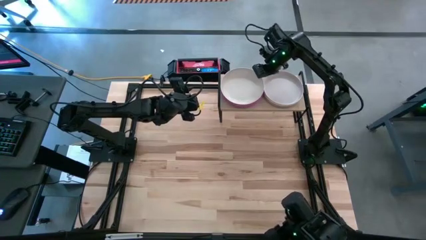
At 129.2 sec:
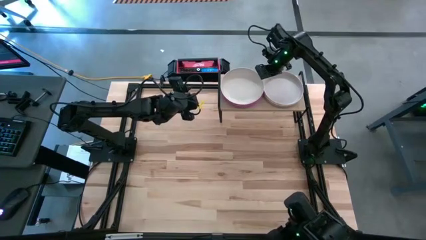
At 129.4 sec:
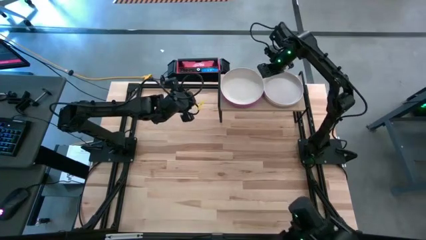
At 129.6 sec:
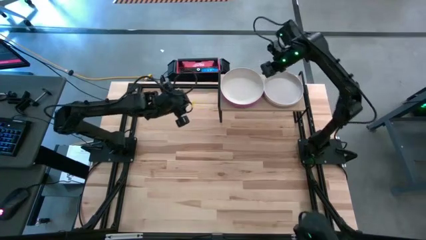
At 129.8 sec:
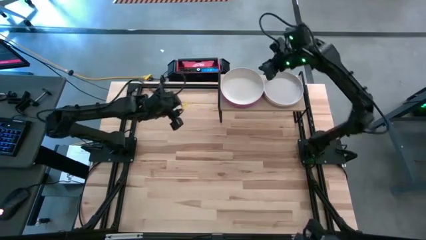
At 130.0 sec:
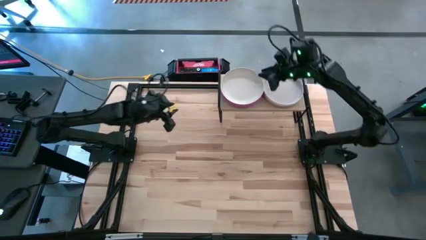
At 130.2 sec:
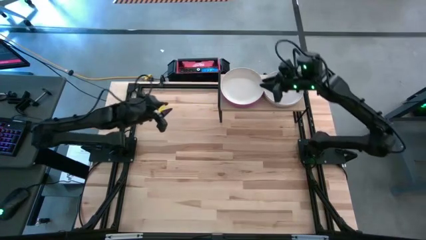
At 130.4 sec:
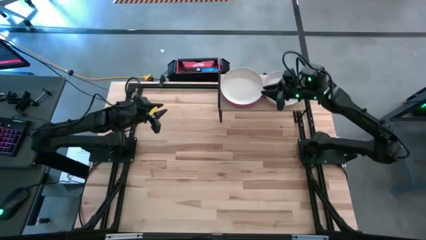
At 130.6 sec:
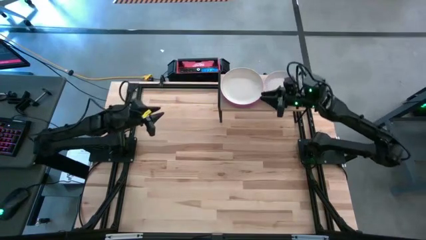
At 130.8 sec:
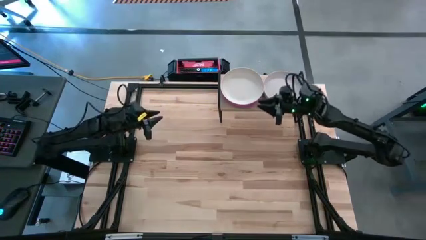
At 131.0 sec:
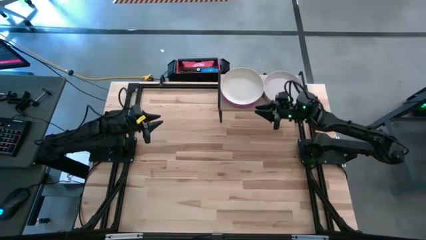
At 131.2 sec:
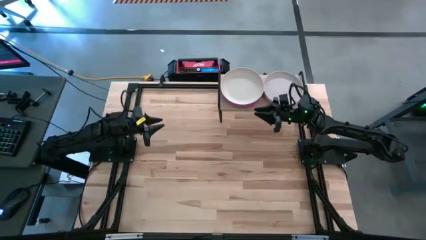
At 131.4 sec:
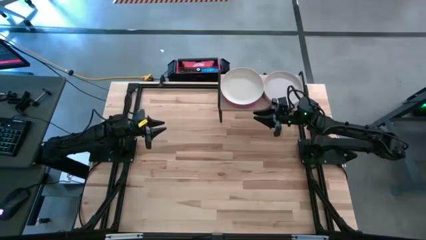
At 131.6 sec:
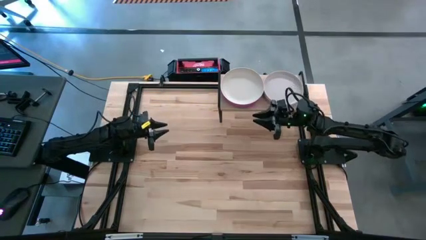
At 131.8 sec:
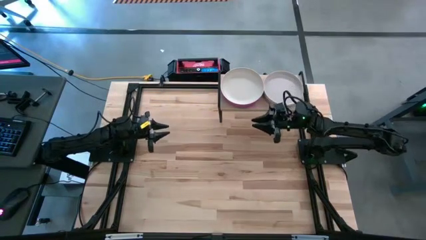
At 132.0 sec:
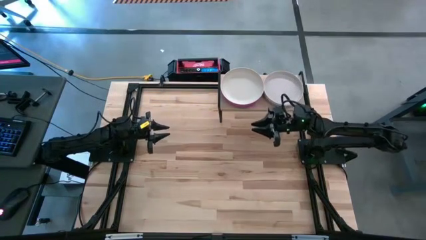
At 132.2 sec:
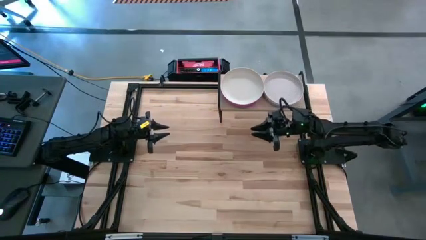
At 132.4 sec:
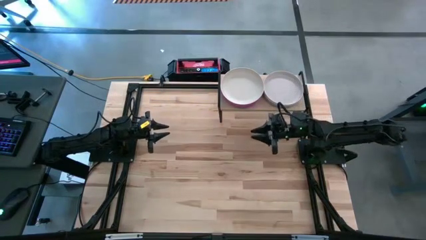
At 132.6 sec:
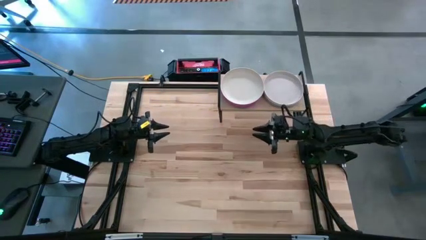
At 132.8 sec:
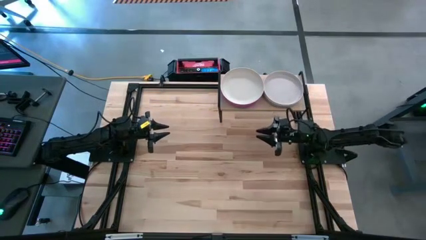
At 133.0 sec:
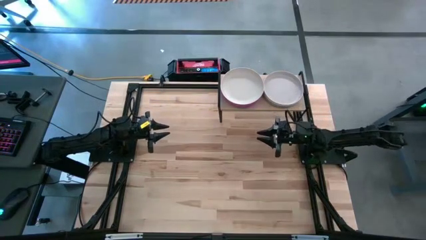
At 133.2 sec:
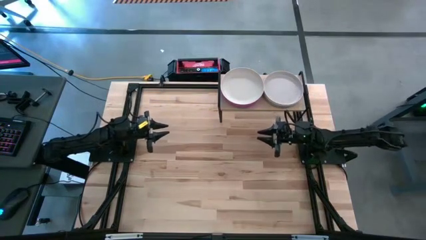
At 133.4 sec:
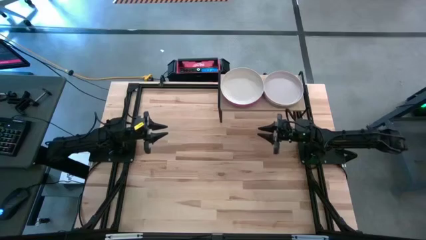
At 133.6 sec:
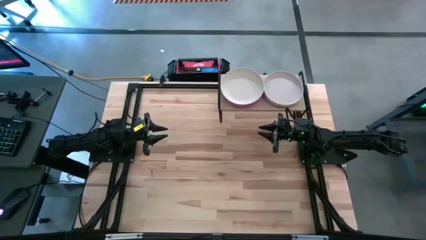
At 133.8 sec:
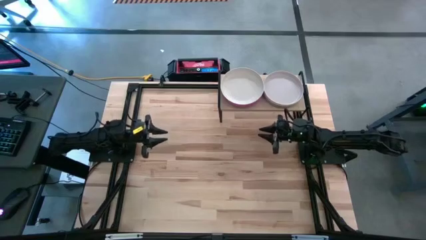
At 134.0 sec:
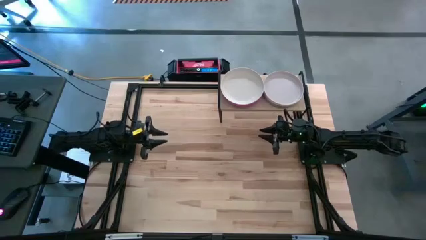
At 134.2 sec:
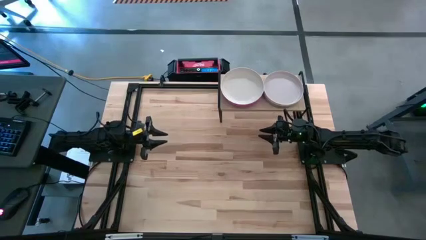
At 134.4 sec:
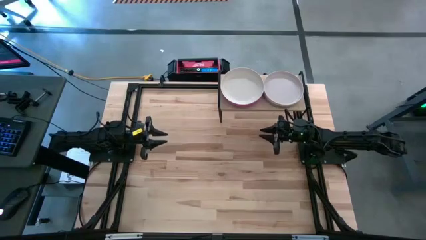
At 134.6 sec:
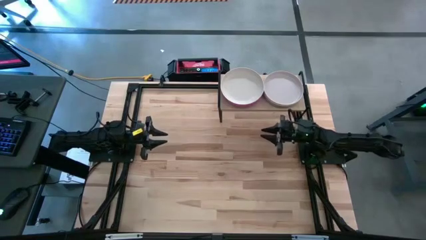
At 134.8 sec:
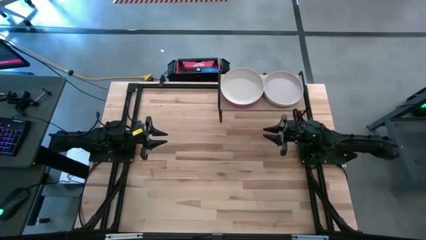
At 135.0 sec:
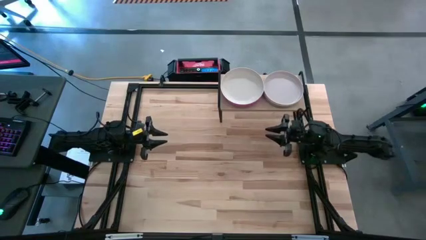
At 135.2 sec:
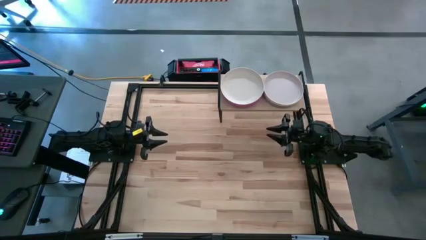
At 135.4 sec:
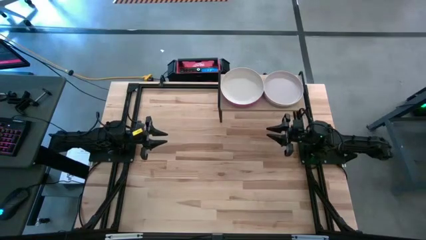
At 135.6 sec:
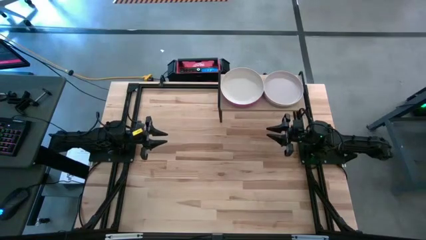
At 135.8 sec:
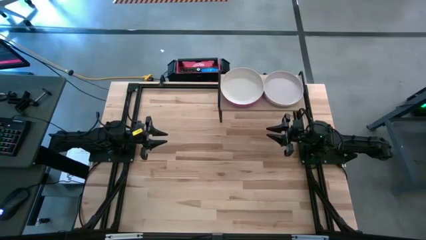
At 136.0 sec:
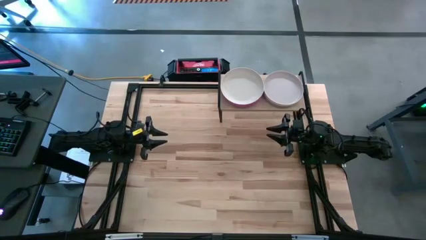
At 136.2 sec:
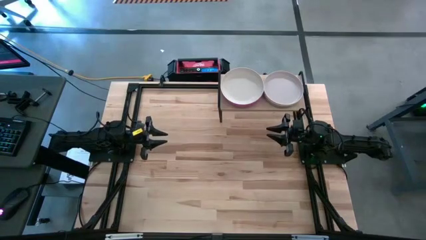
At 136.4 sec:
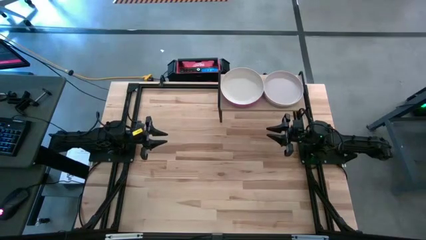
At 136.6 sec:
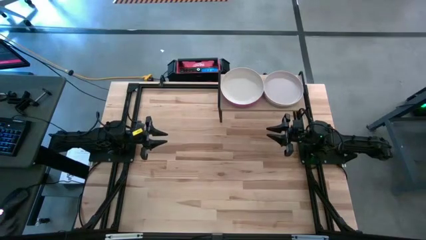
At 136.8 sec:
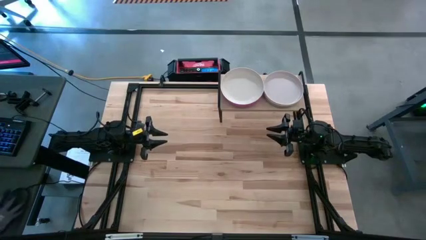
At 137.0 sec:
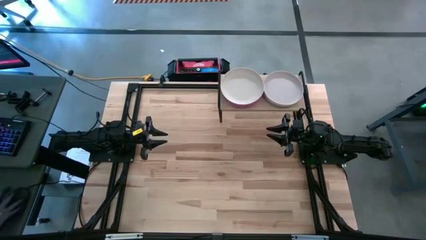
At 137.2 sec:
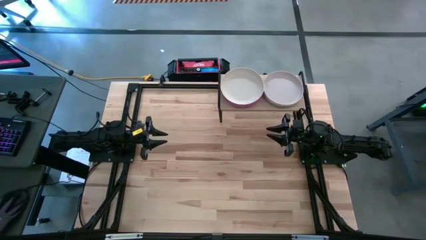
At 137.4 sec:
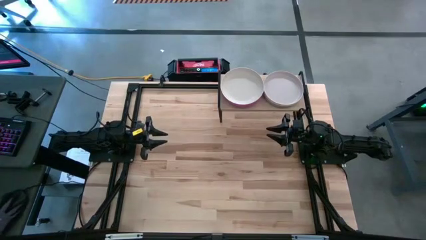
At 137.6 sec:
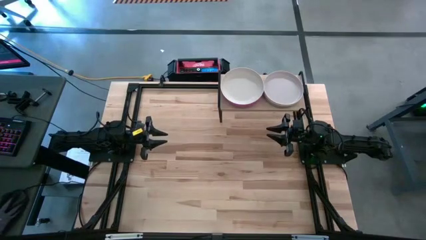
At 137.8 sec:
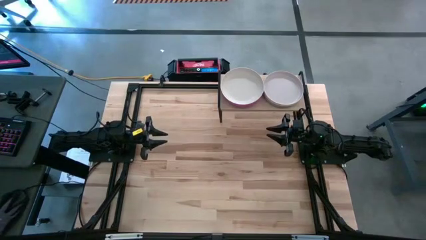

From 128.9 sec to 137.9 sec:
Task: Place and stack plates onto a shelf
Return to Home Position

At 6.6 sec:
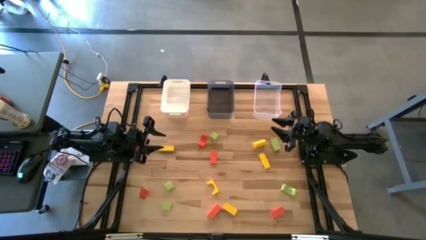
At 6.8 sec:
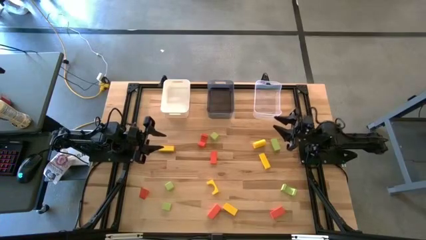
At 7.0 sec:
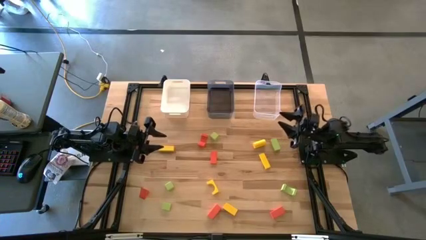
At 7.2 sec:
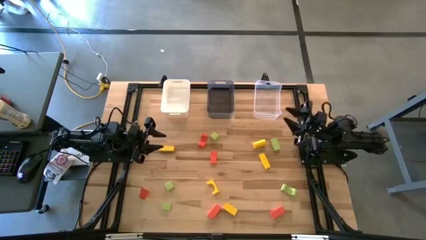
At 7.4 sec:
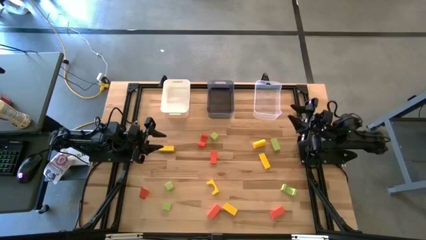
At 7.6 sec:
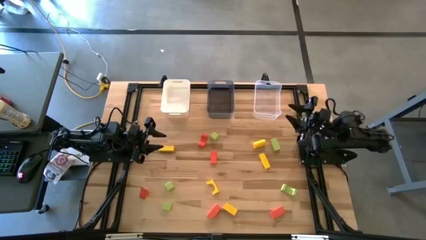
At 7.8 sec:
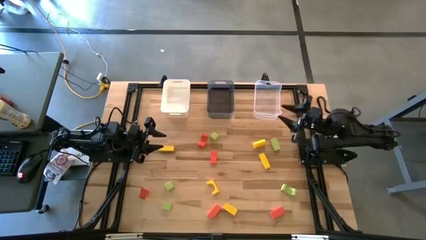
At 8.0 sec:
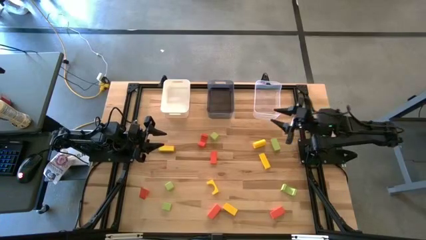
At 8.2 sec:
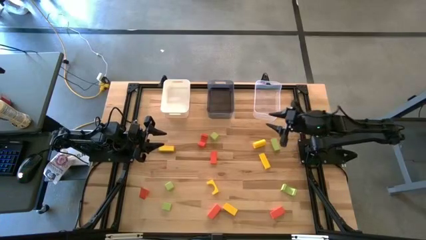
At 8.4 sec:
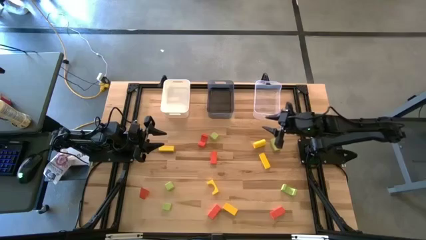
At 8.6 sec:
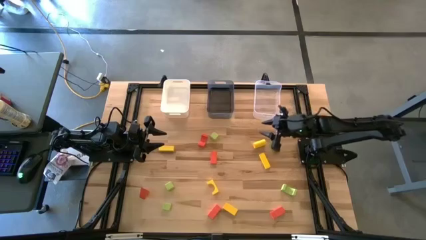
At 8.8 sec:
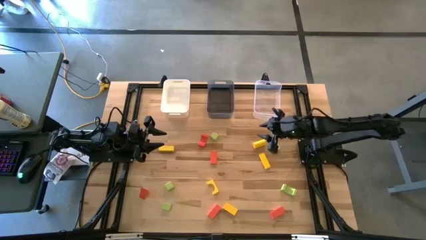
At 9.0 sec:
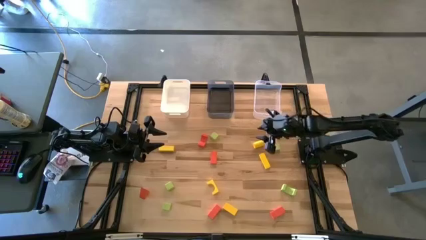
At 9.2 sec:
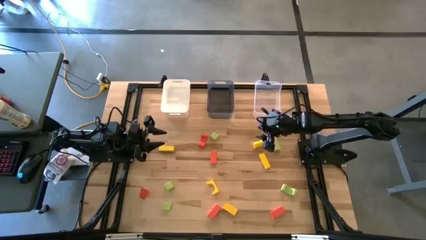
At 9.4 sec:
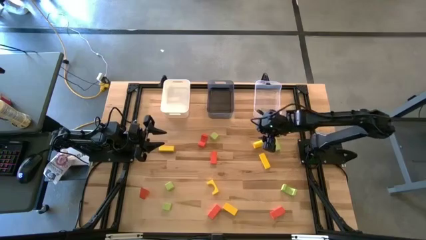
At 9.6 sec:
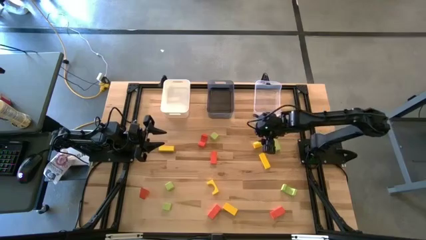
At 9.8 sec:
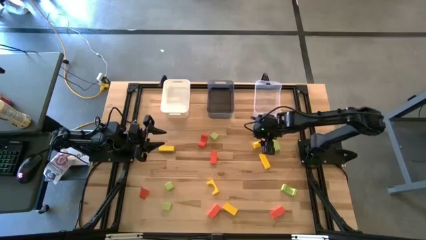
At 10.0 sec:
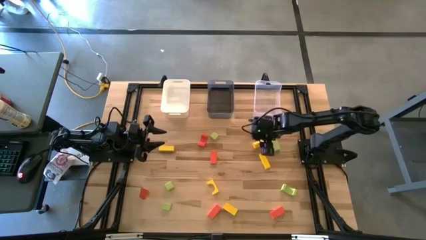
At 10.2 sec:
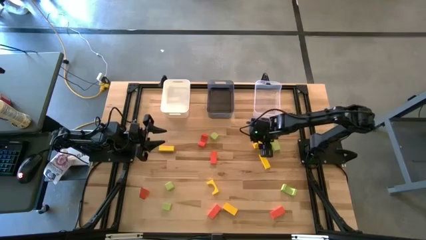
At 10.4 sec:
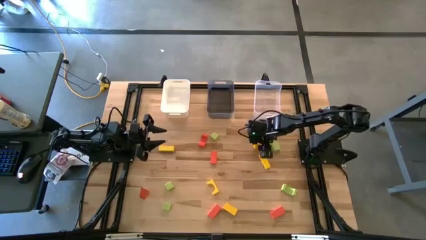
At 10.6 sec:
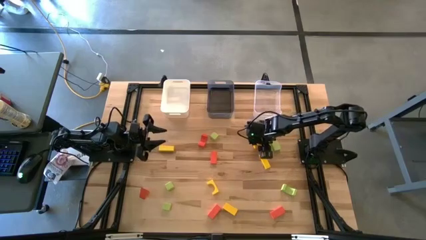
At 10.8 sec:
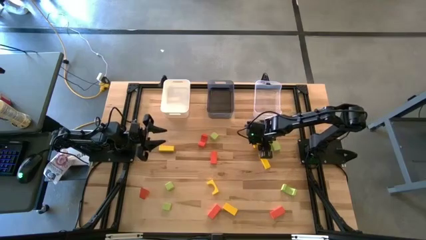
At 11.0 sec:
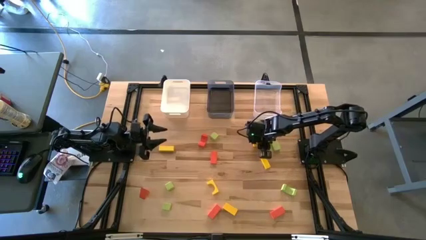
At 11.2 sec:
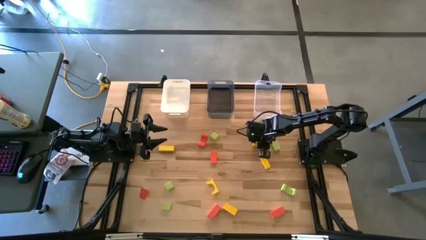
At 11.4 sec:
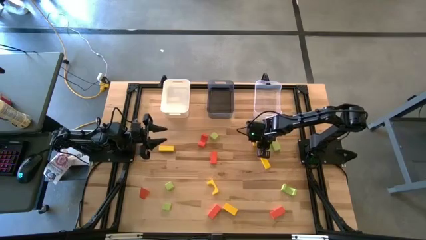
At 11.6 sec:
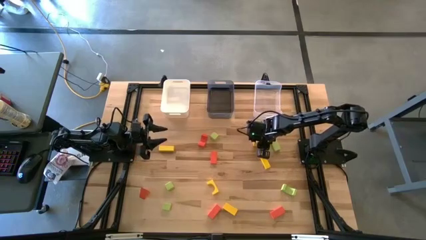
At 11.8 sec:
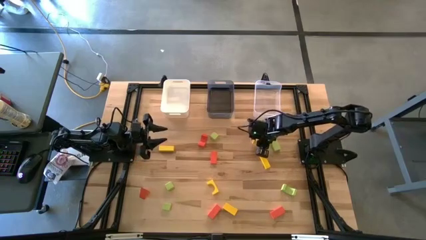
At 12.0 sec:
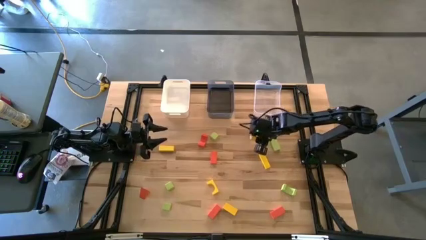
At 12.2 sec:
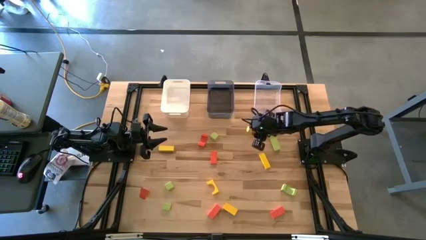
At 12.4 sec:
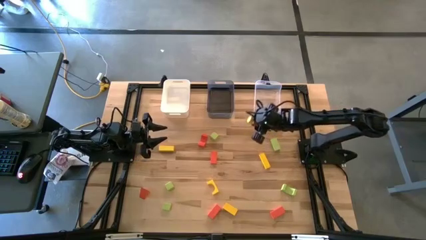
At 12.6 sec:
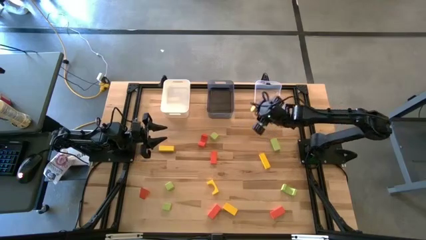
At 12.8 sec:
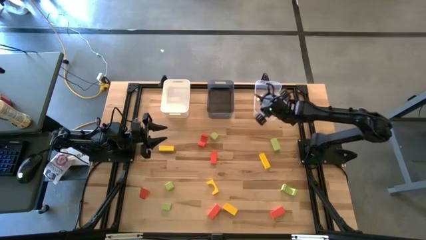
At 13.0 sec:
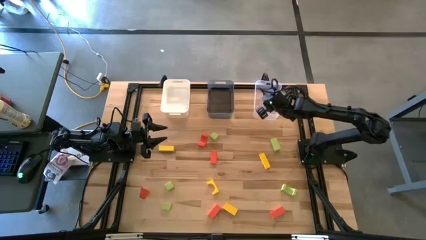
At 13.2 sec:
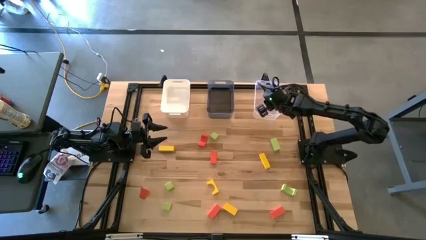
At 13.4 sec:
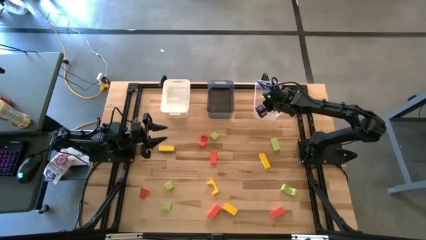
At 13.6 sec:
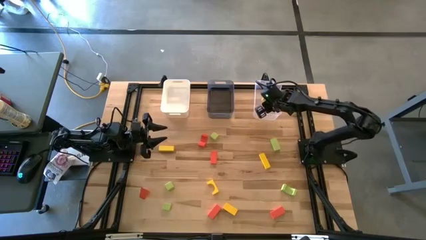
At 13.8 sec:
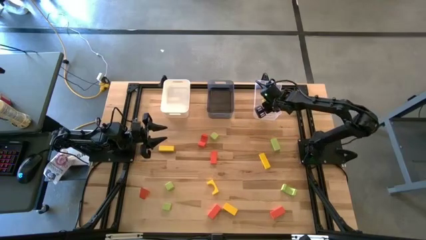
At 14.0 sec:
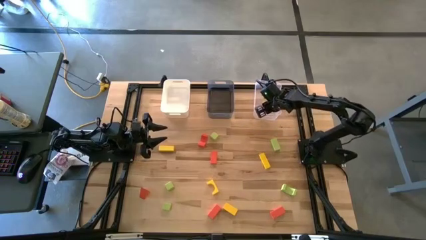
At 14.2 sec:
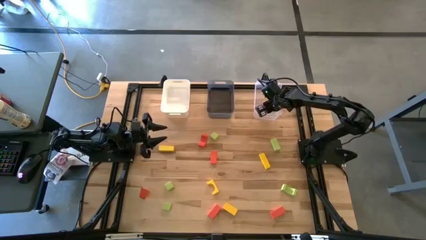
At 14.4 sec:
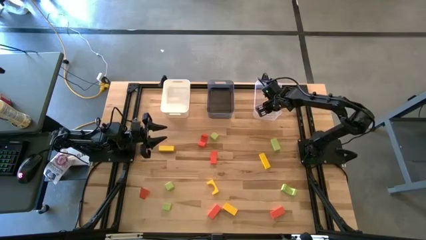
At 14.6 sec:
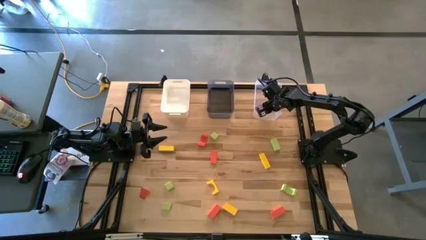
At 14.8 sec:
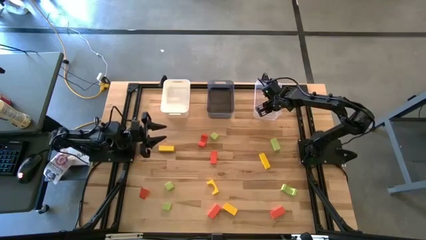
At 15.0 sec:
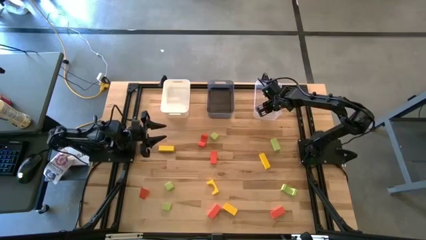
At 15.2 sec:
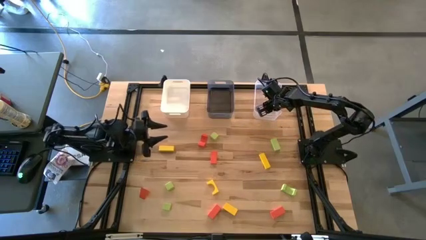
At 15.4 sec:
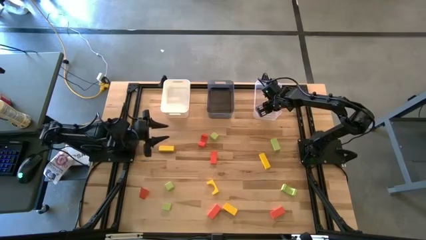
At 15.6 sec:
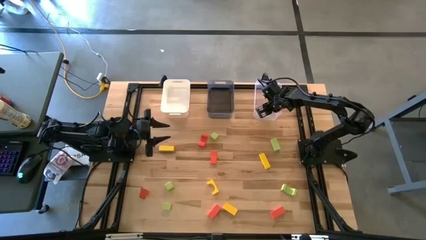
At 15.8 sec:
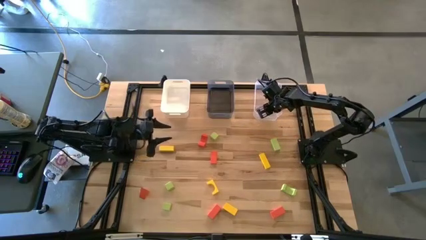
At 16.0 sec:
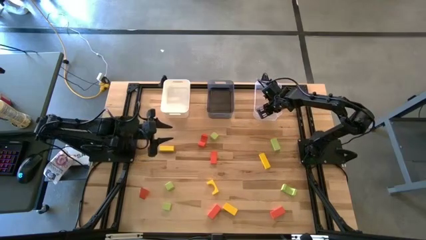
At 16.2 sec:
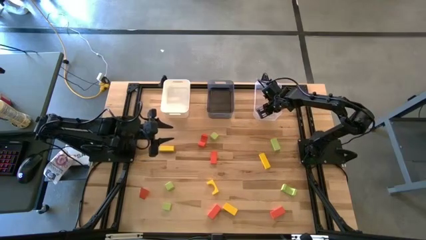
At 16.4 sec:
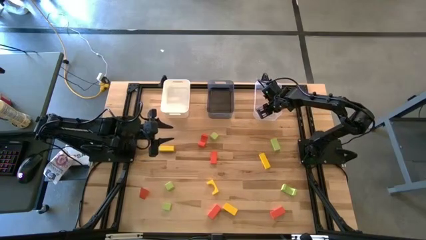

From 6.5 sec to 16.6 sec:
Task: Sort & place blocks by color
Put the yellow block into the transparent bin
